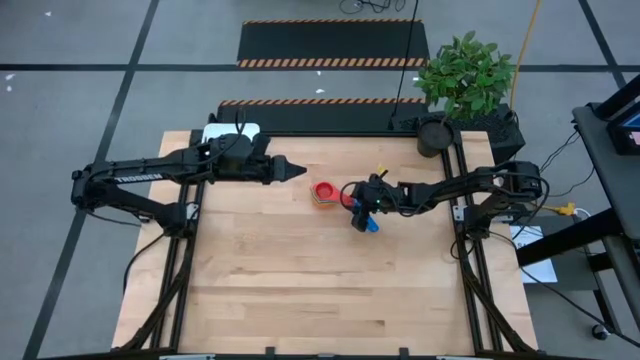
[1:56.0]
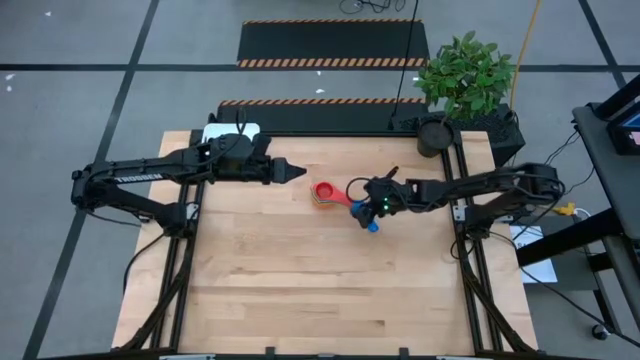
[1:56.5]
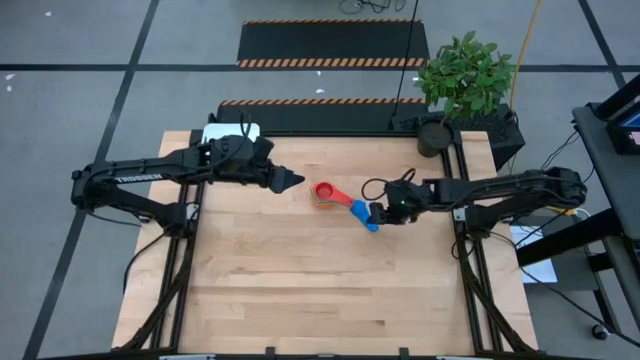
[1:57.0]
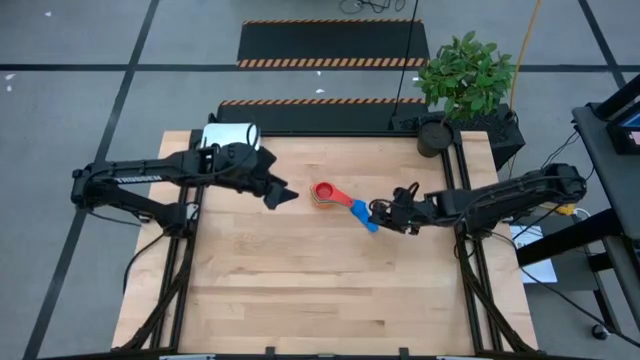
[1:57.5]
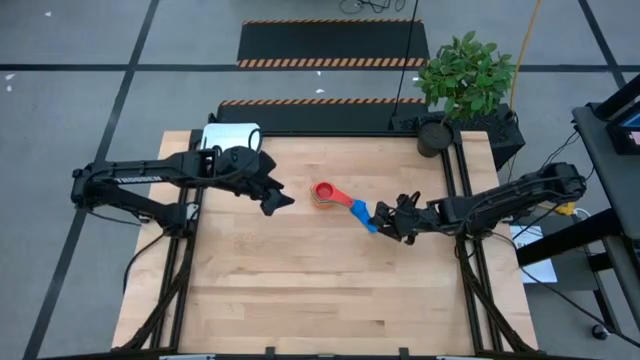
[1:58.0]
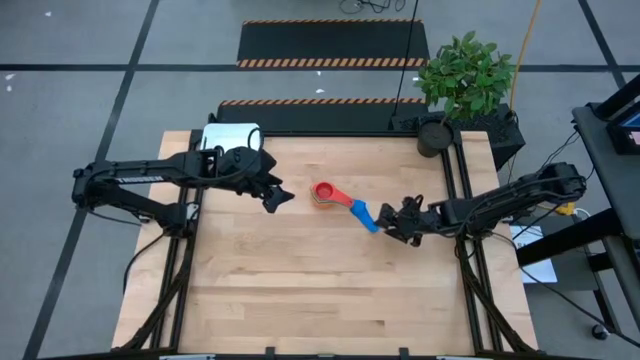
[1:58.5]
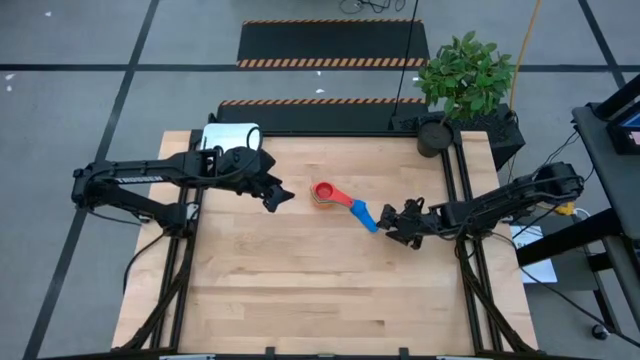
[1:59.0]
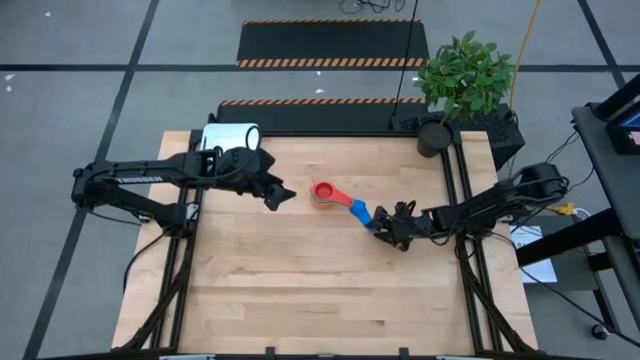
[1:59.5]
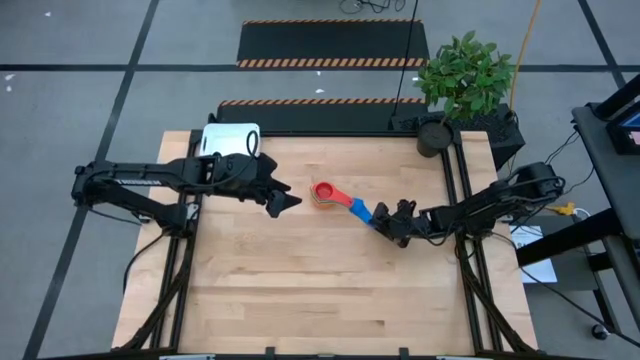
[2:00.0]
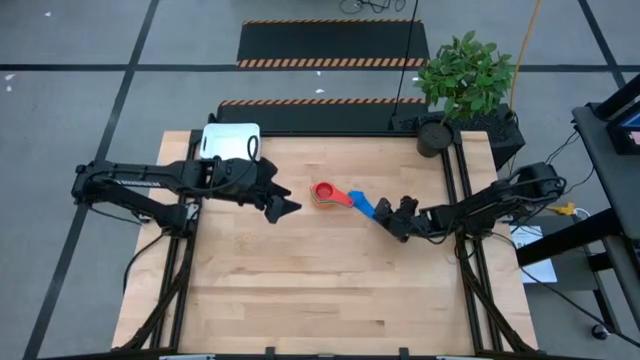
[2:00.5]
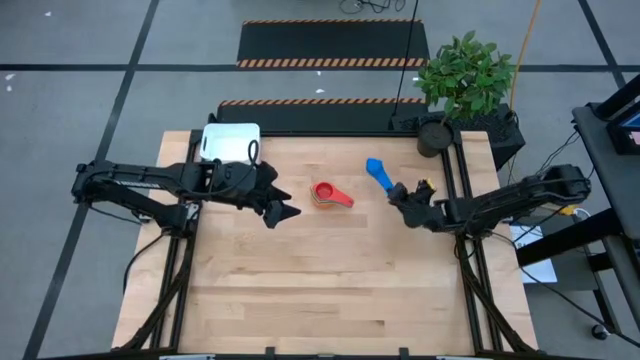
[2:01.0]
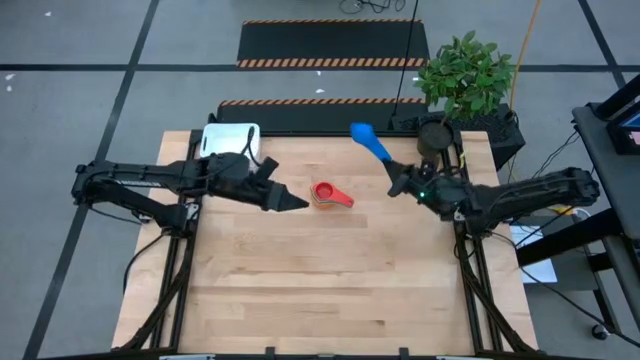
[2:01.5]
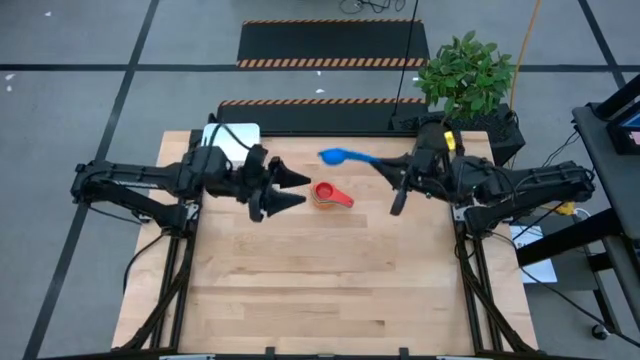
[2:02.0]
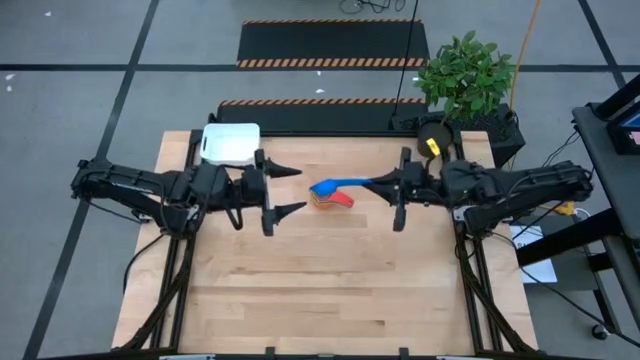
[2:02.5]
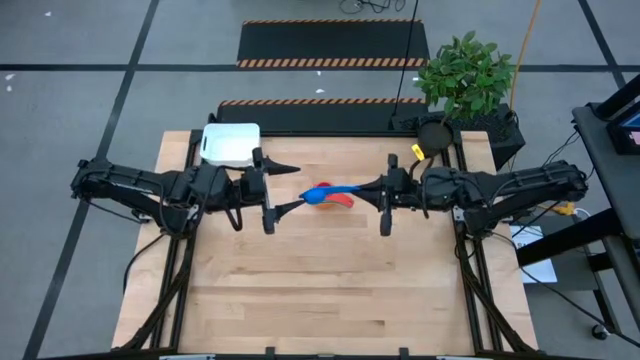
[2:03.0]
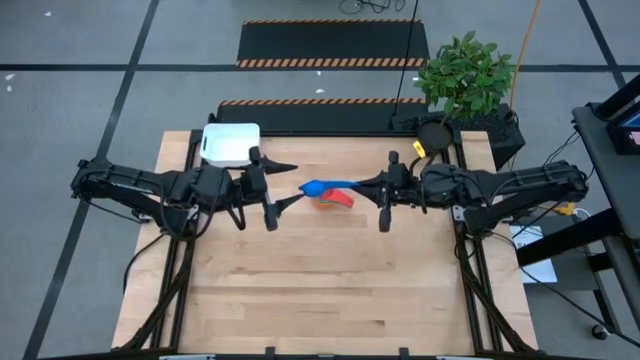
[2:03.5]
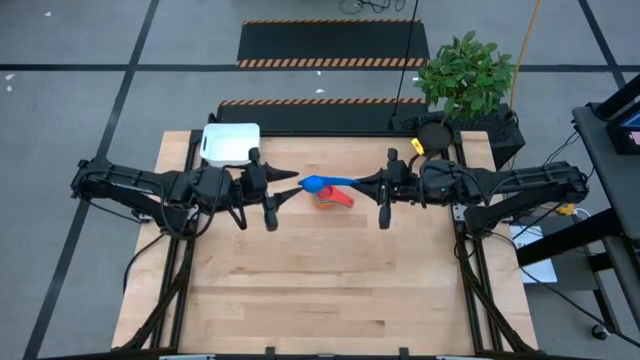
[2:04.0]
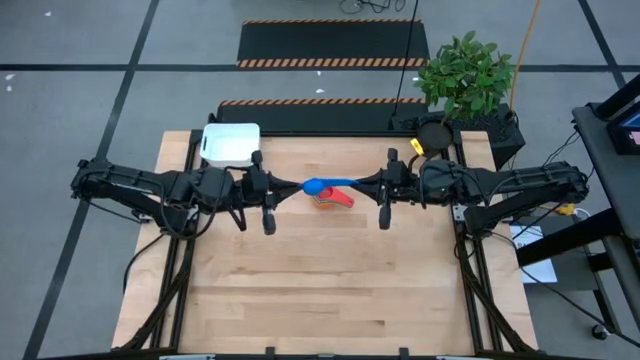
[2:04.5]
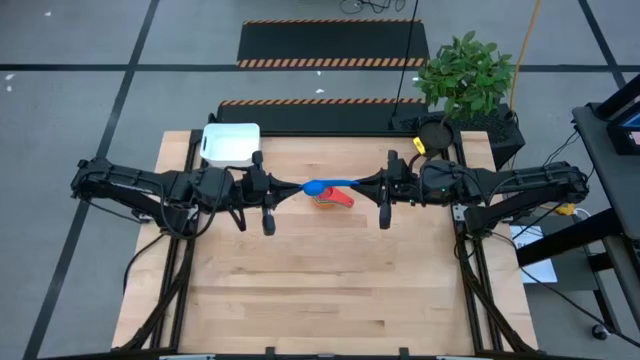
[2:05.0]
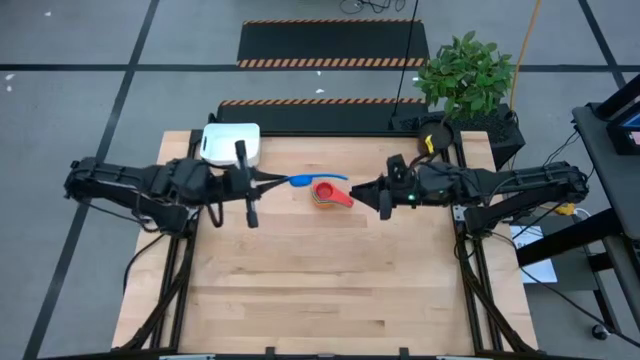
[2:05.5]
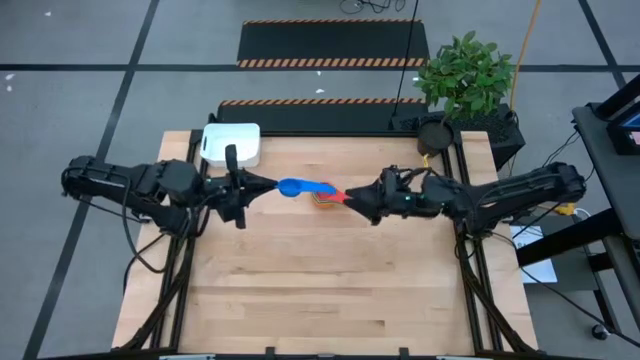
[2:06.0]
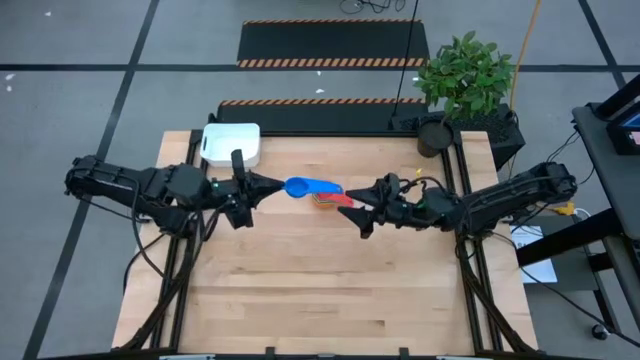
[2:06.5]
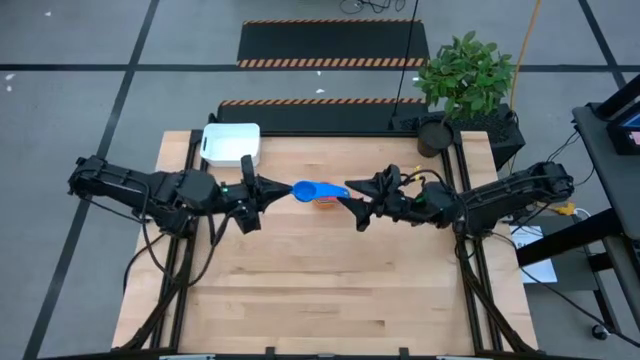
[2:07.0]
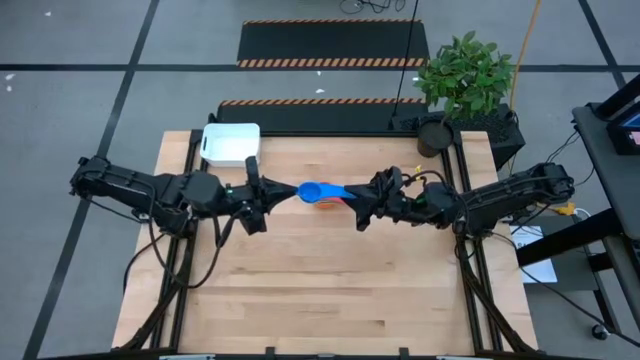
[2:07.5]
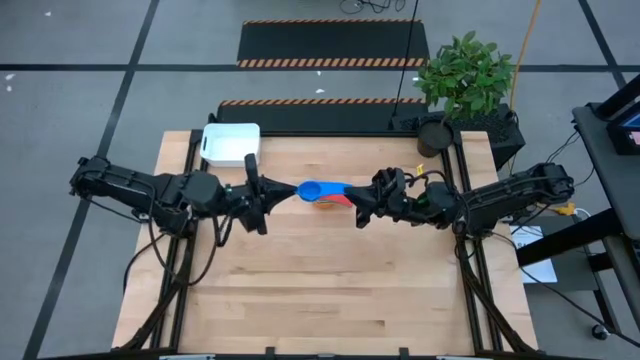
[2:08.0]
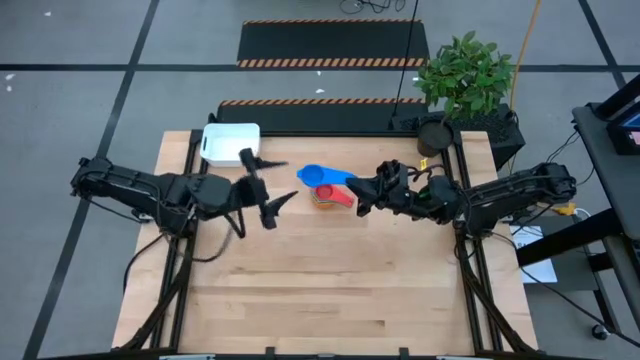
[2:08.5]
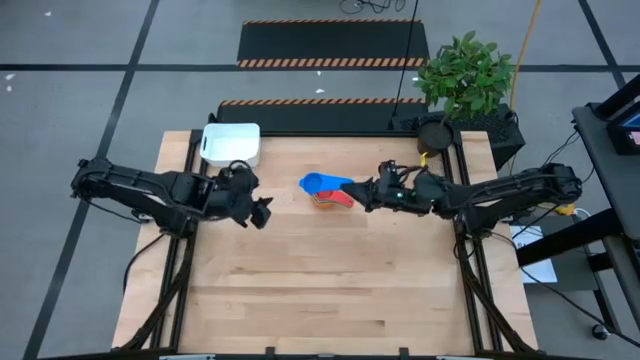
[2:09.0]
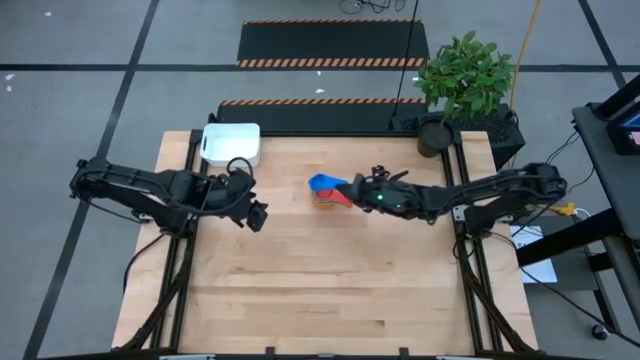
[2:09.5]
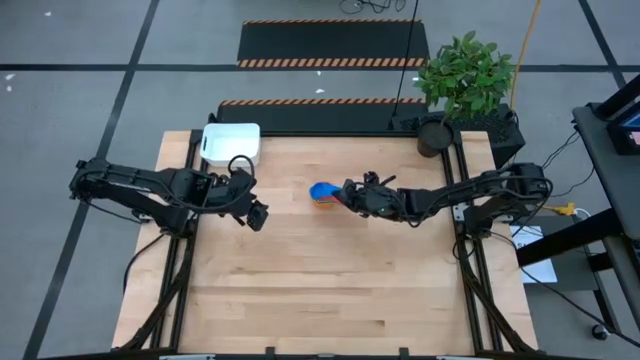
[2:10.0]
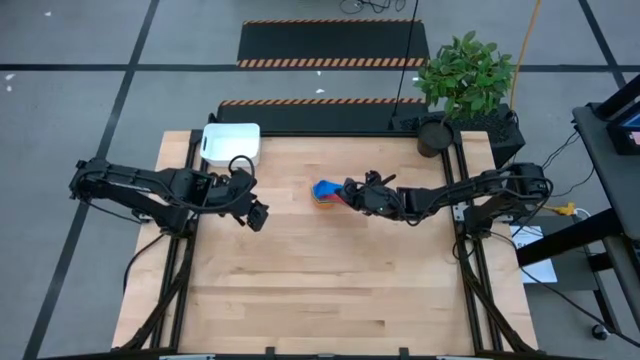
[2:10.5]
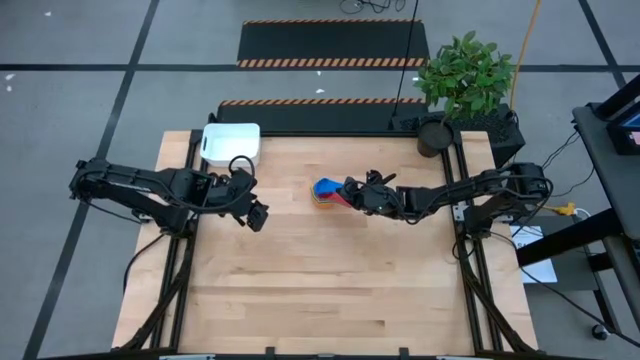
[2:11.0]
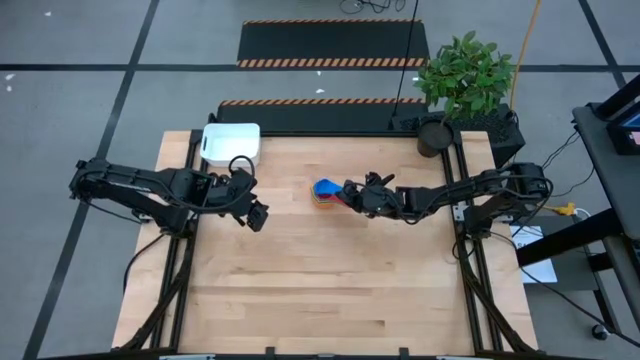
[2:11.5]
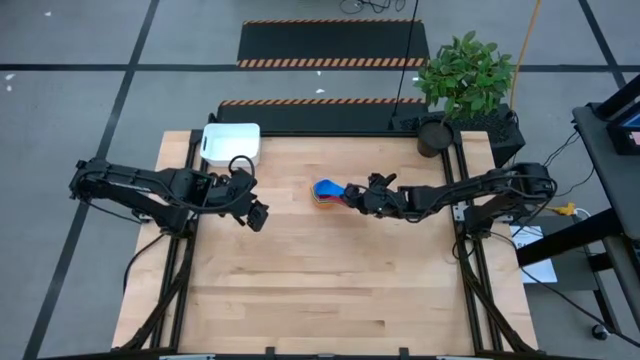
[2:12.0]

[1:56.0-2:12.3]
Task: Nest measuring cups in basket
Stack the blue measuring cup into the red measuring cup

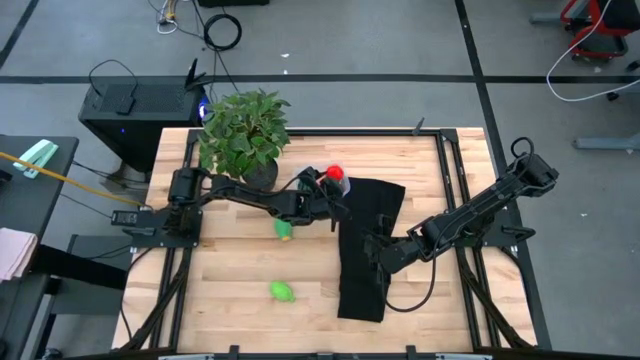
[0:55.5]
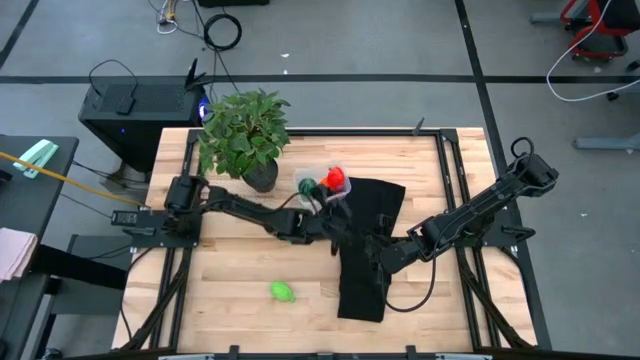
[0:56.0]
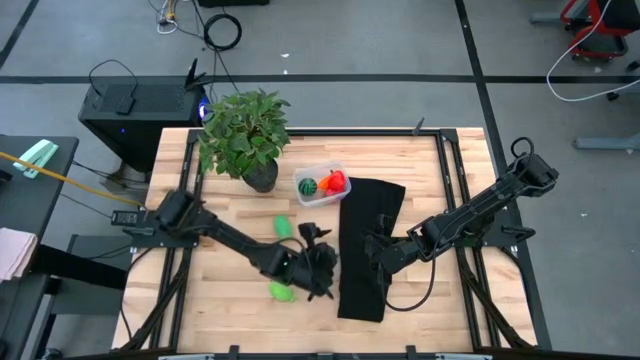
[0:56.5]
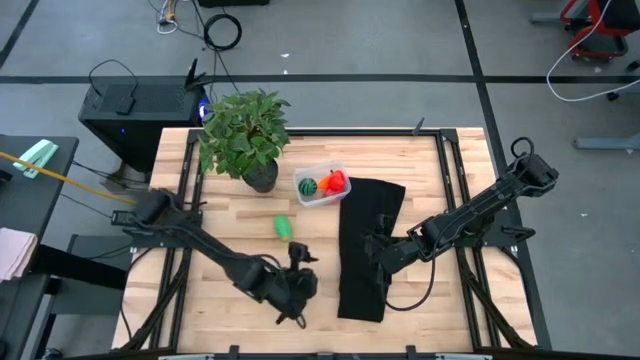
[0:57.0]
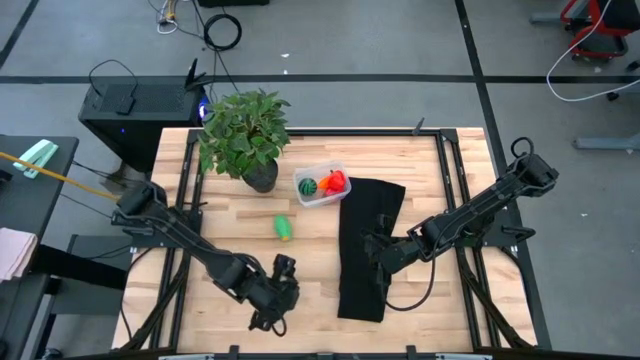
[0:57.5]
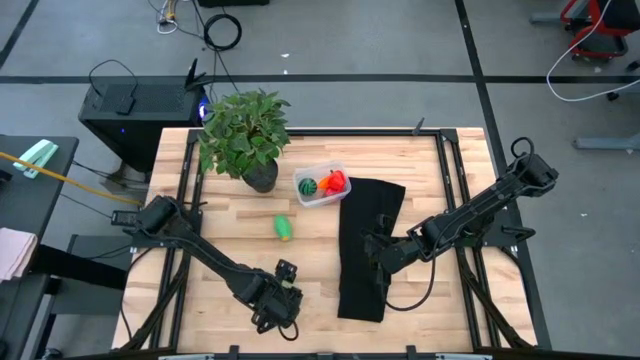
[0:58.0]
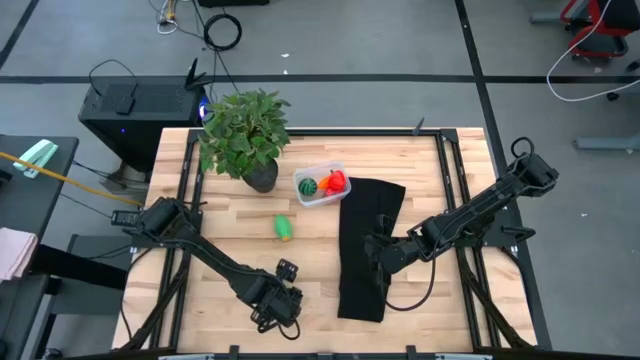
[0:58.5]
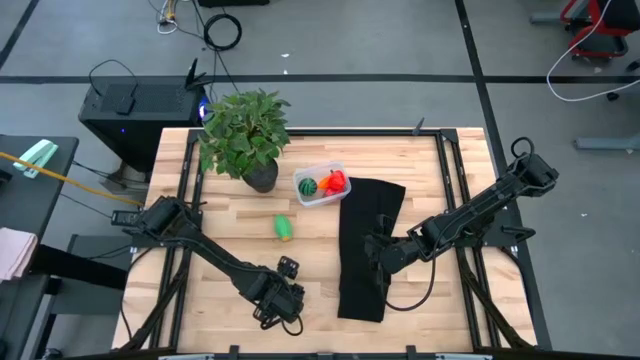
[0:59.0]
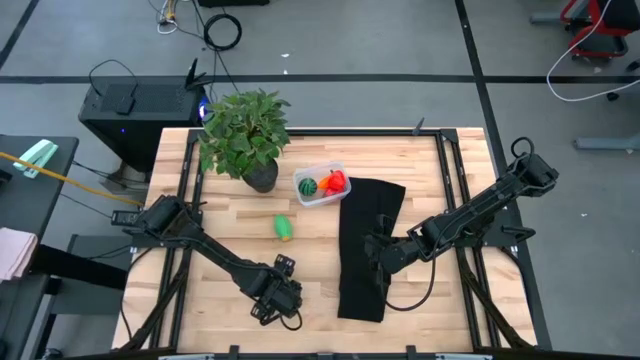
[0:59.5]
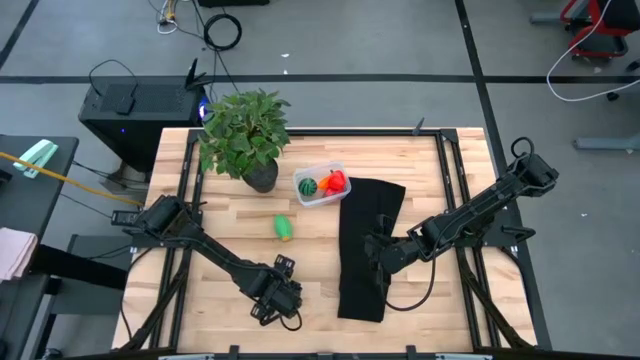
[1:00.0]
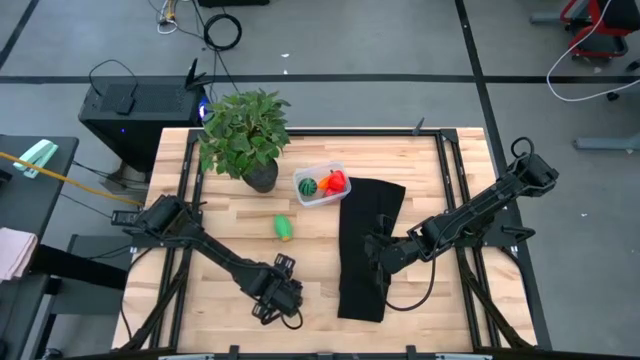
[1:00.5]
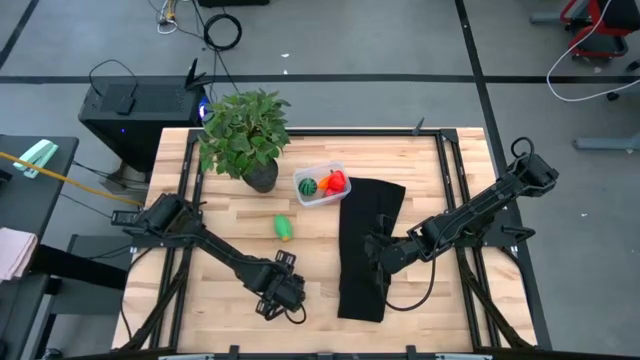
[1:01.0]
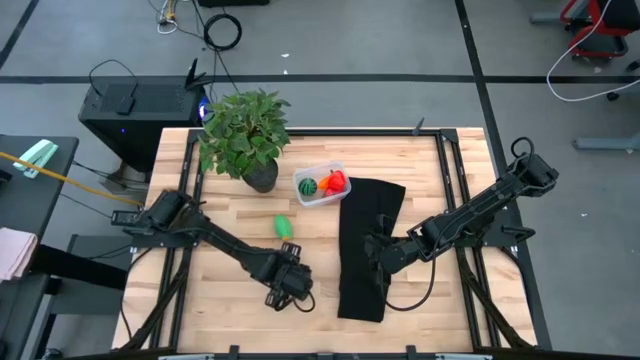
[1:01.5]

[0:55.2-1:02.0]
Task: Pick and placing Produce into tupperware
Put the green melon into the transparent bin
